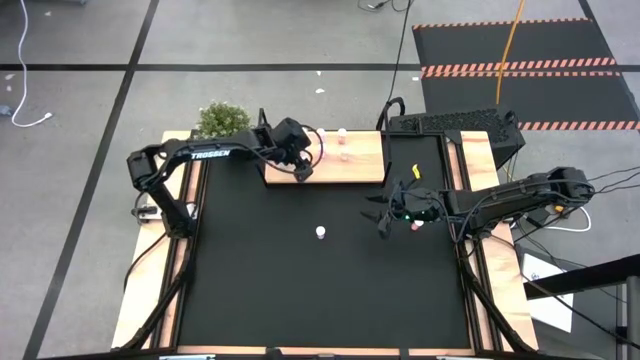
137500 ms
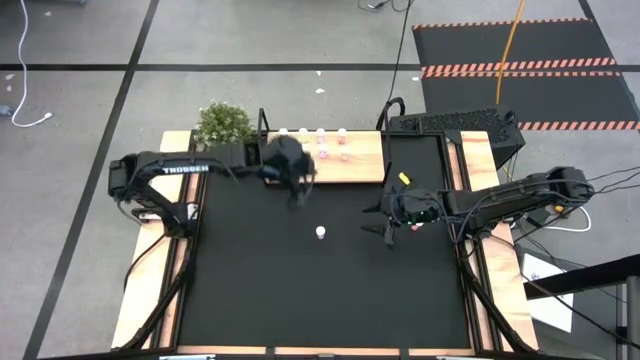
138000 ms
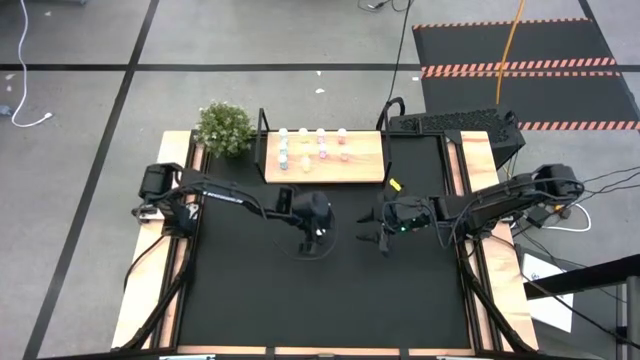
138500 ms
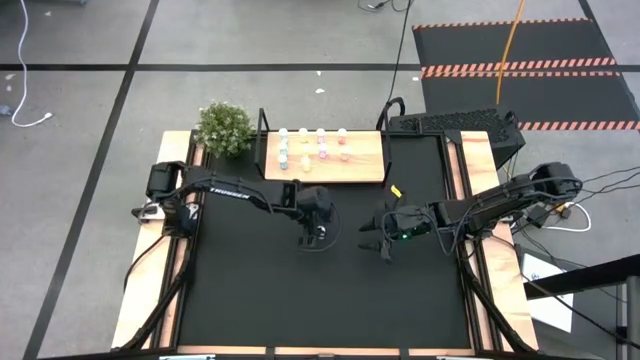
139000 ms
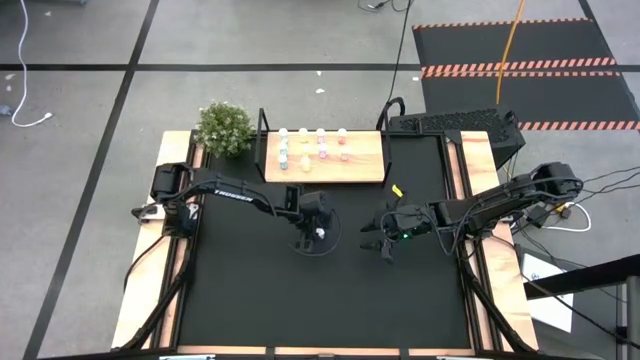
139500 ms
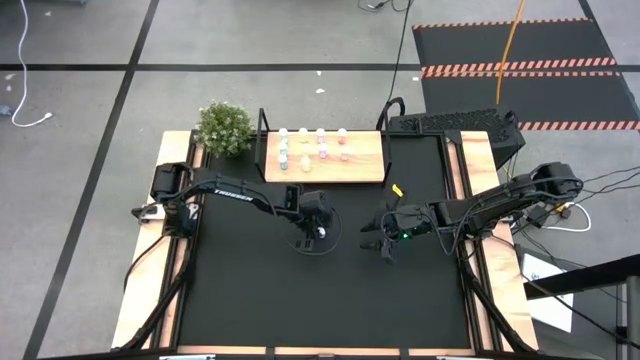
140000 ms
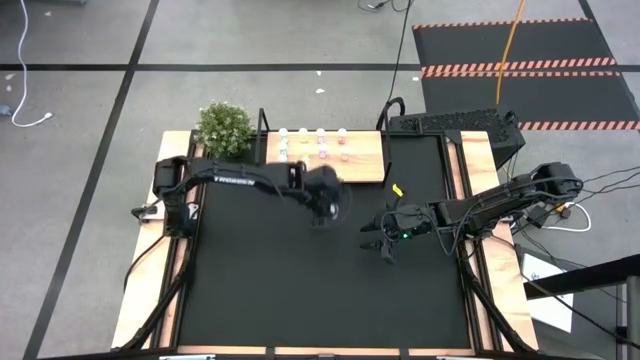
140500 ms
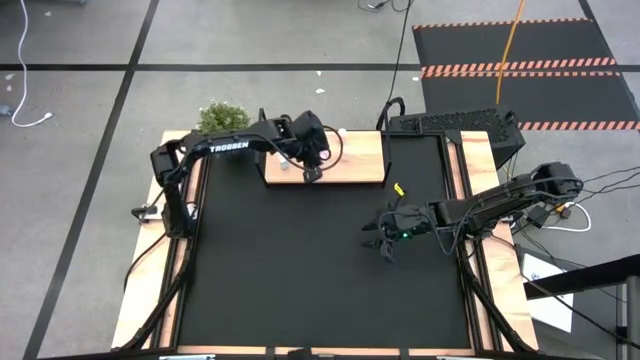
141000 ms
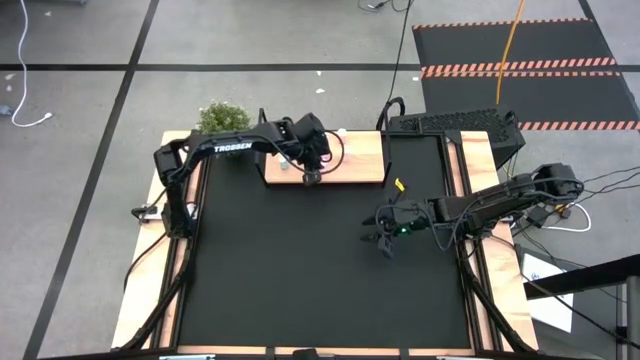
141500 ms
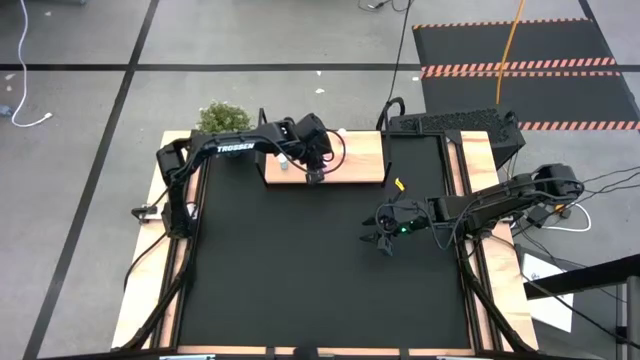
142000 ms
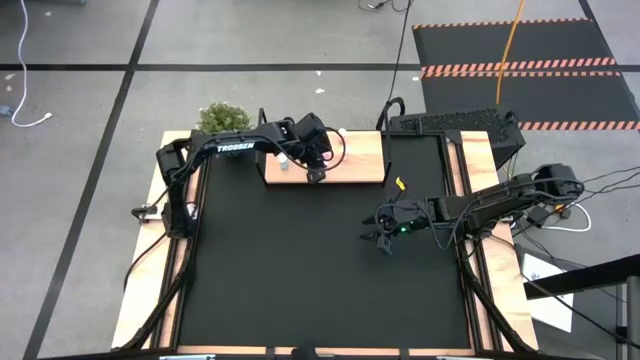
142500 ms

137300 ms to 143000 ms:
Task: Pick and place medicine bottles onto shelf by color
Put the pink pill bottle on the shelf

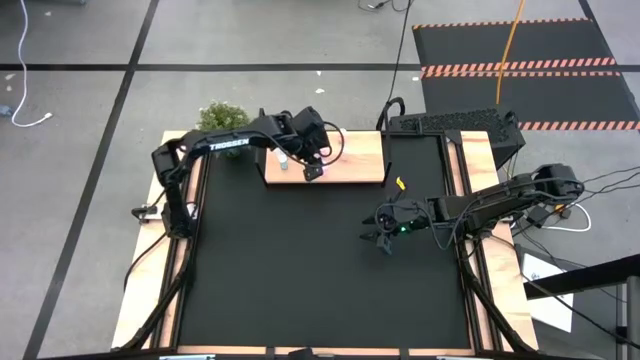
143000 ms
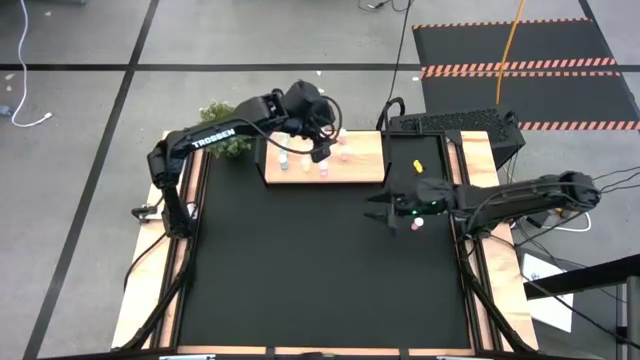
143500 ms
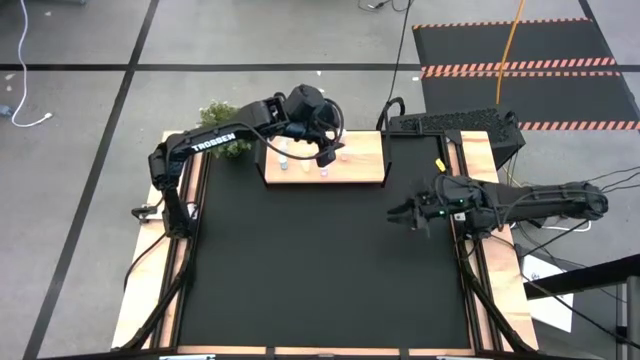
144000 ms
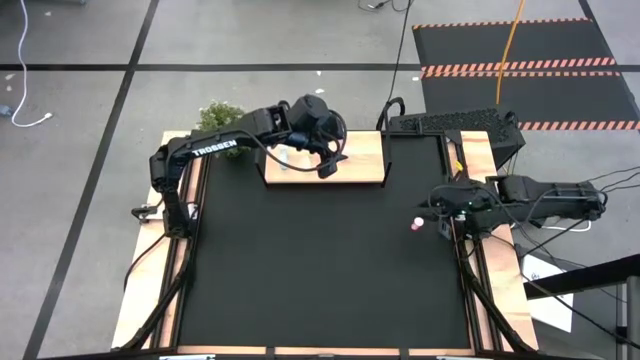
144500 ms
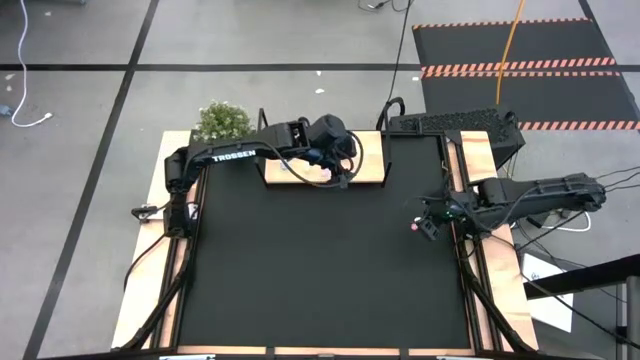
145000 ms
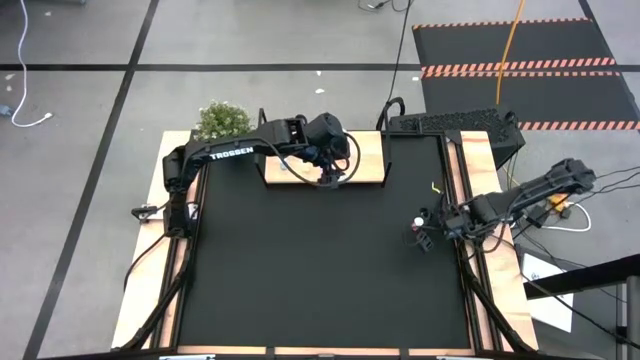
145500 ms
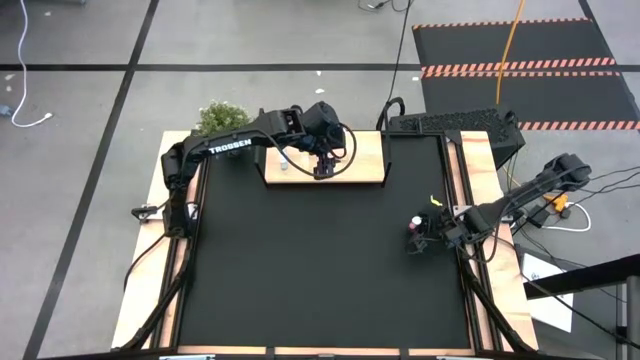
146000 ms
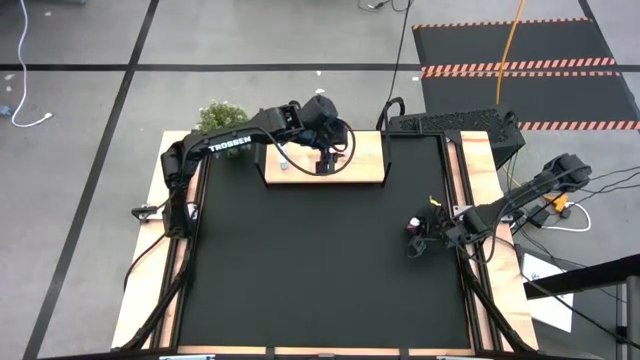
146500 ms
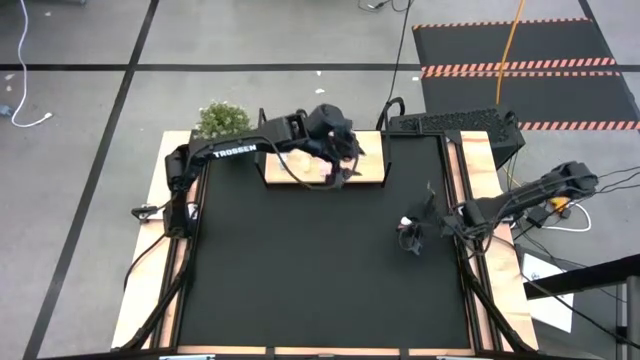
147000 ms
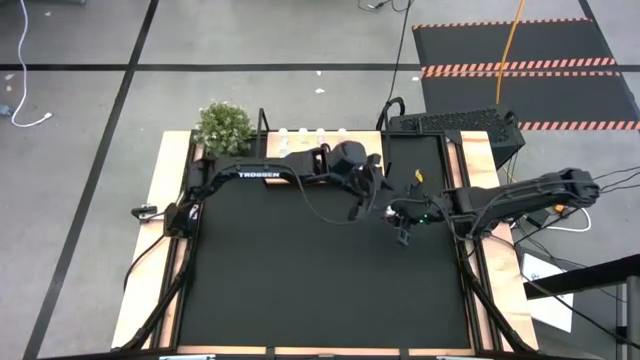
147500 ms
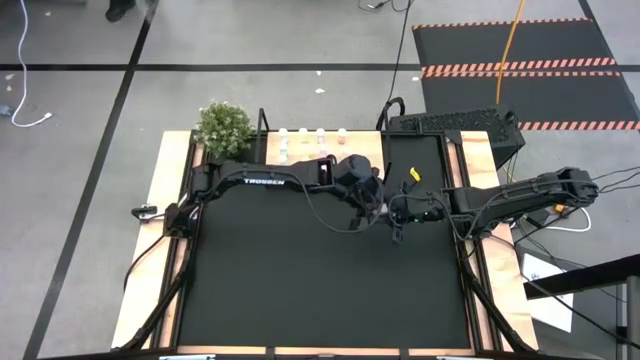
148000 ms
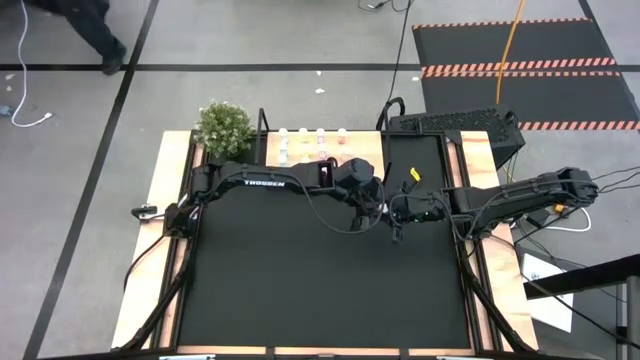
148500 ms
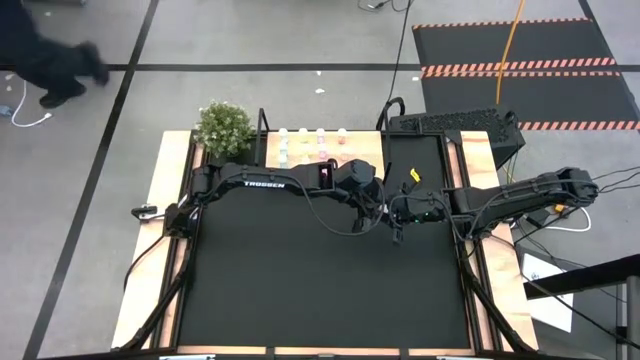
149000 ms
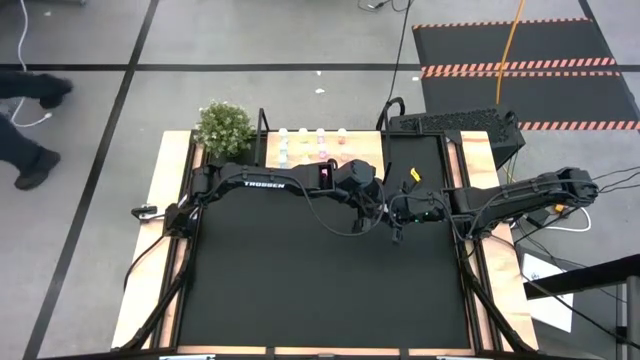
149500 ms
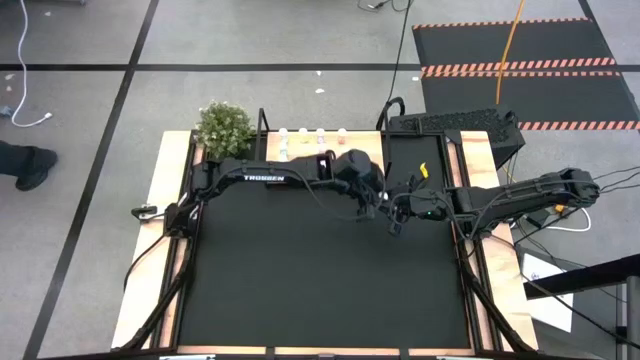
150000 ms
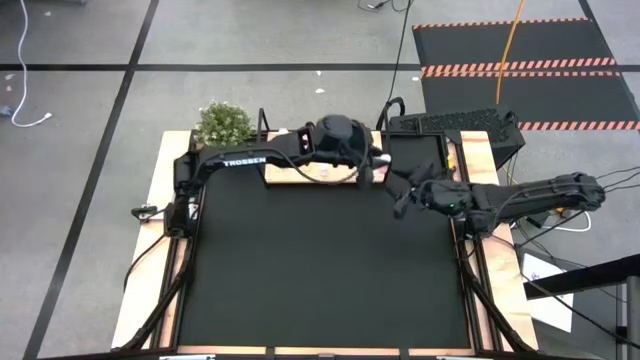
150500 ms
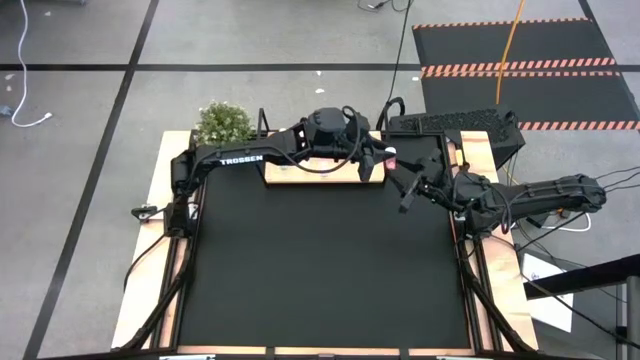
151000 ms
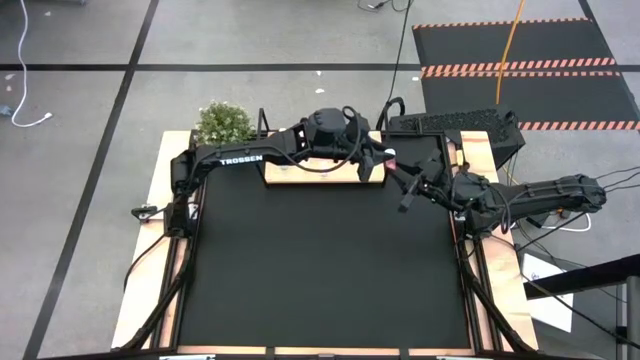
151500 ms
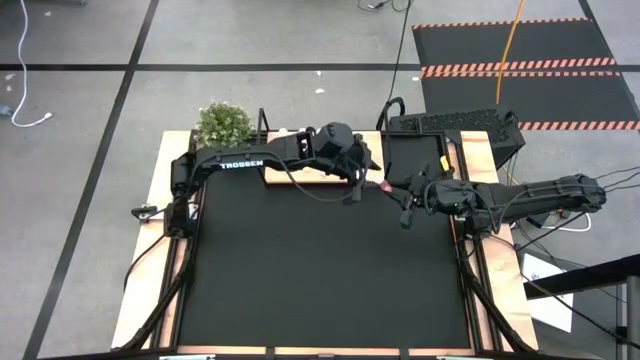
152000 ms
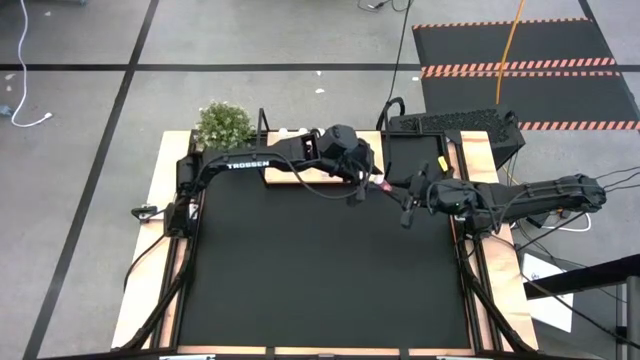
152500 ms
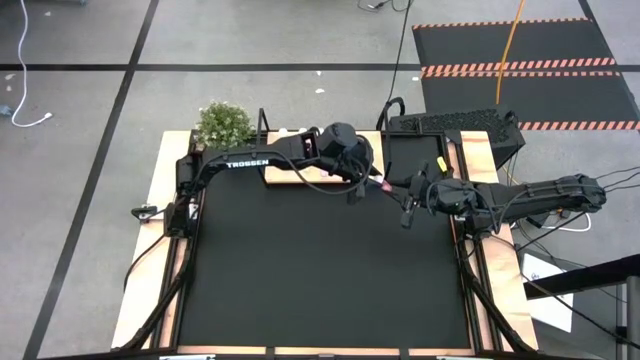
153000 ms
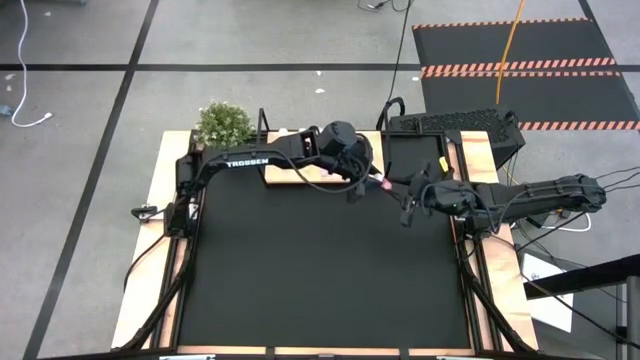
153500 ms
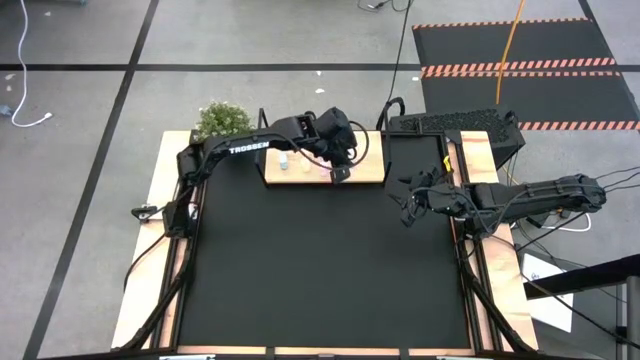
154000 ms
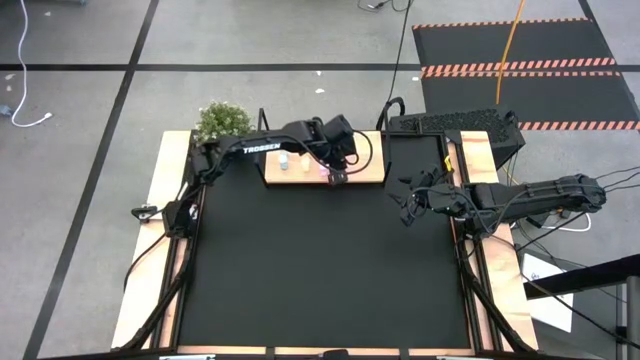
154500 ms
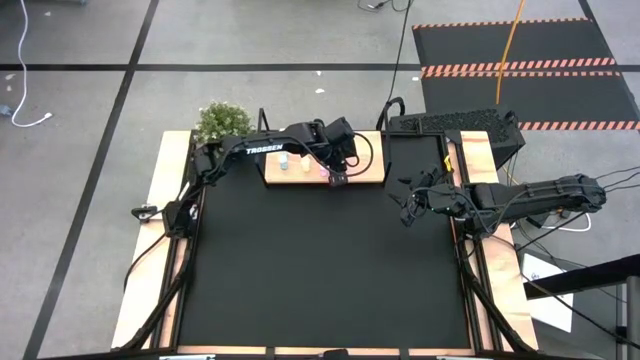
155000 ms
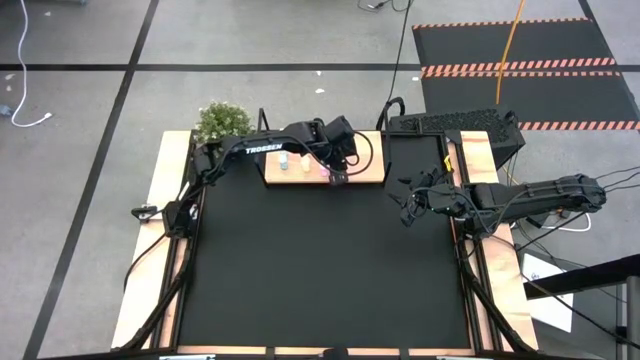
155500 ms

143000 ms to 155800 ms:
Put the orange pill bottle on the shelf

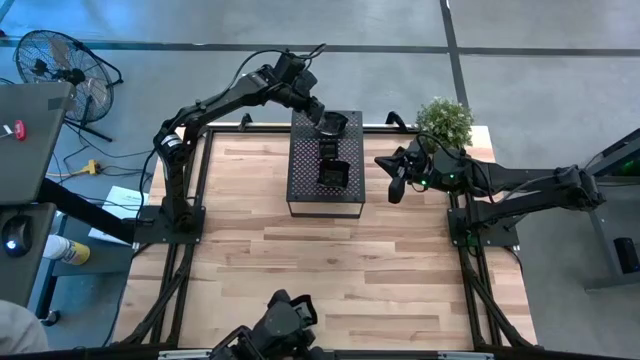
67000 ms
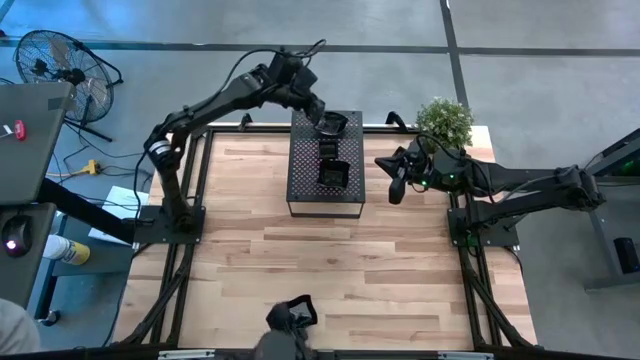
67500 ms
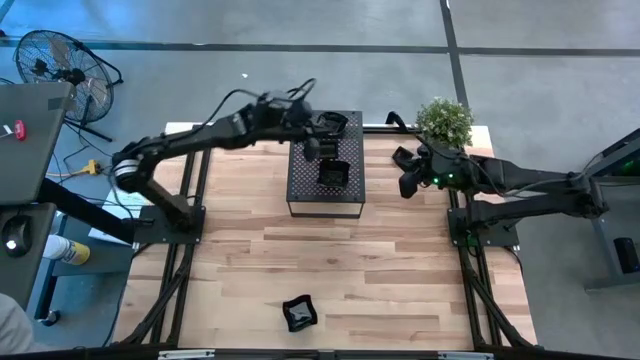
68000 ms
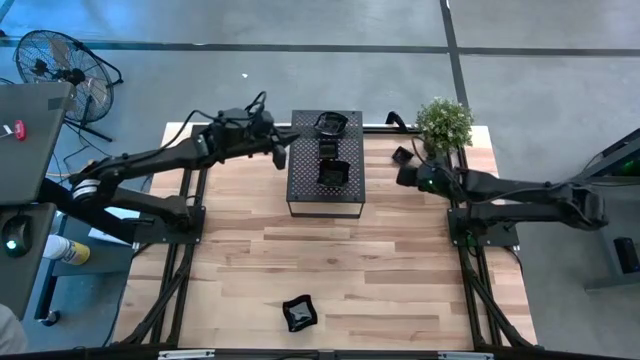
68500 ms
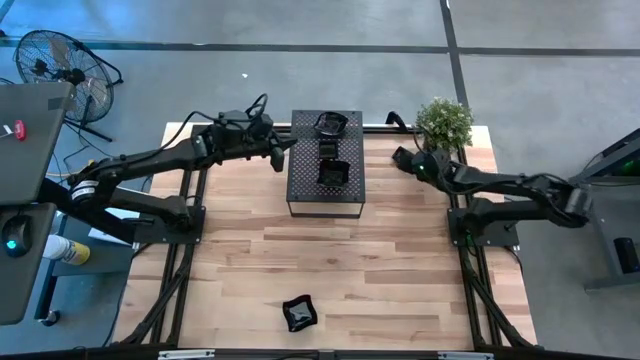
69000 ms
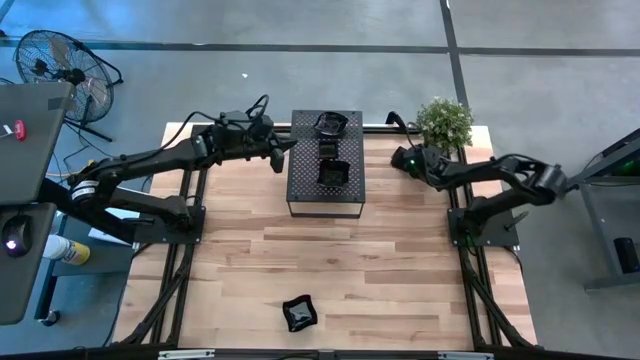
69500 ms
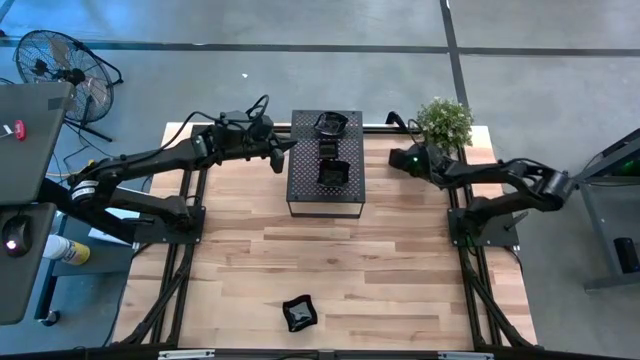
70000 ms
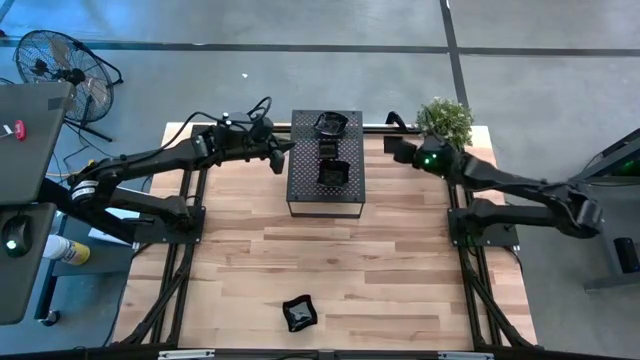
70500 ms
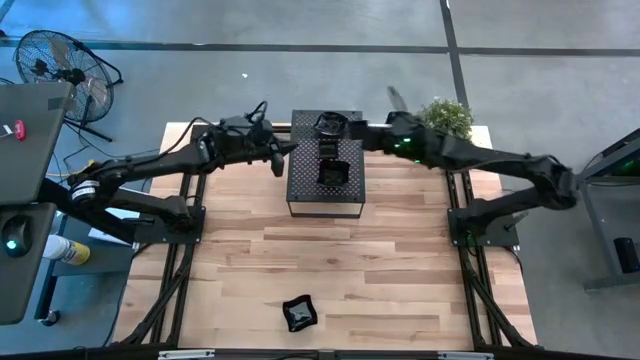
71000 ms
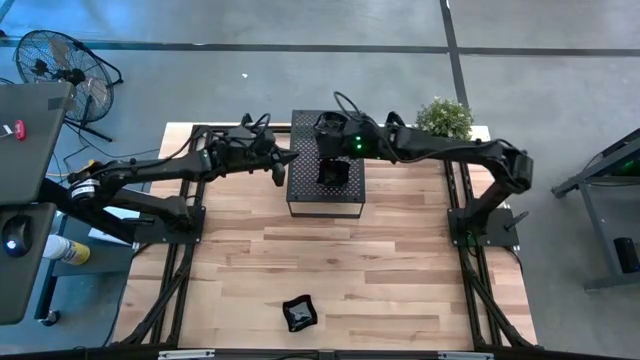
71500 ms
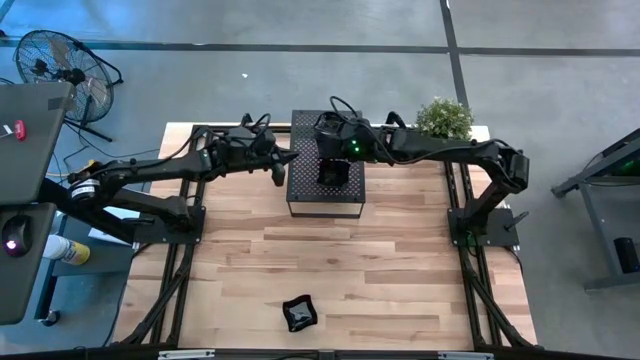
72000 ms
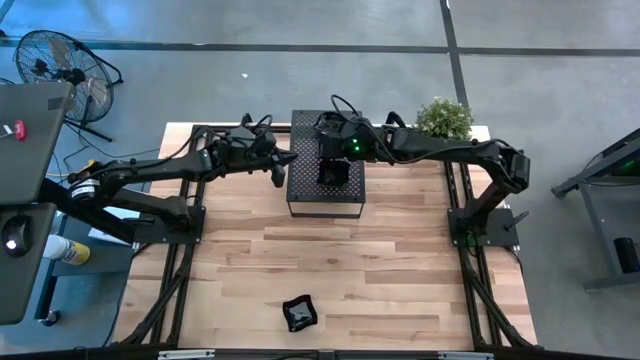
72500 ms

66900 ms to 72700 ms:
Task: Pick & Place Mini shaped plates
Stack the square plate on top of the stacked square plates on the shelf
